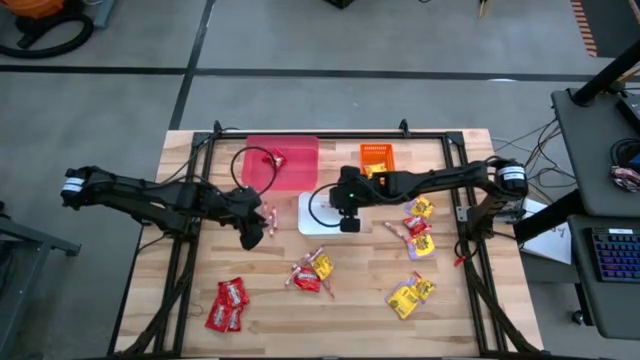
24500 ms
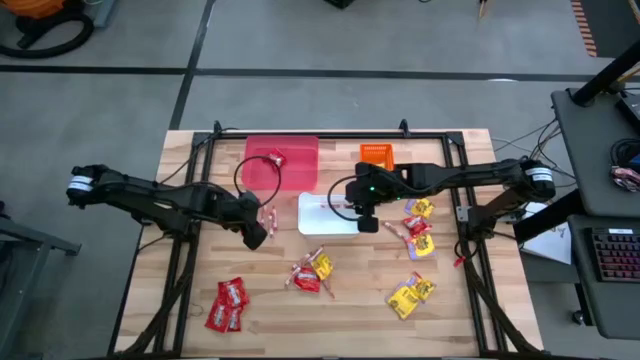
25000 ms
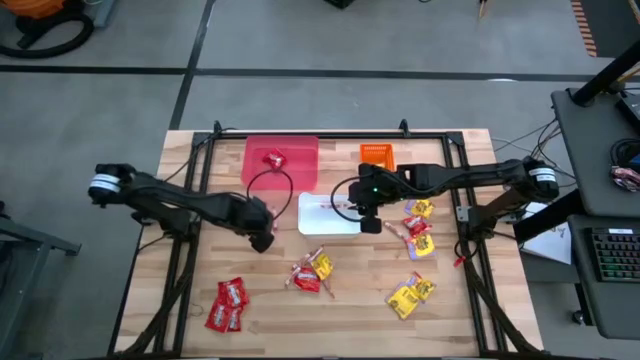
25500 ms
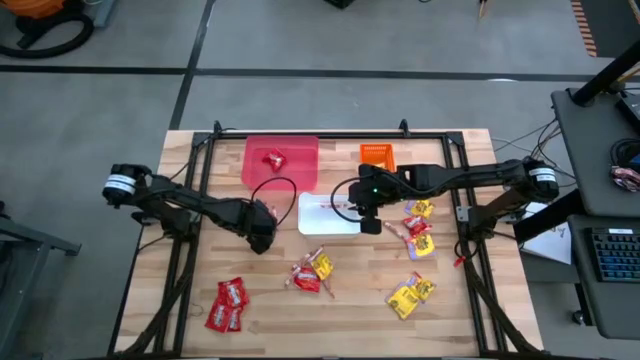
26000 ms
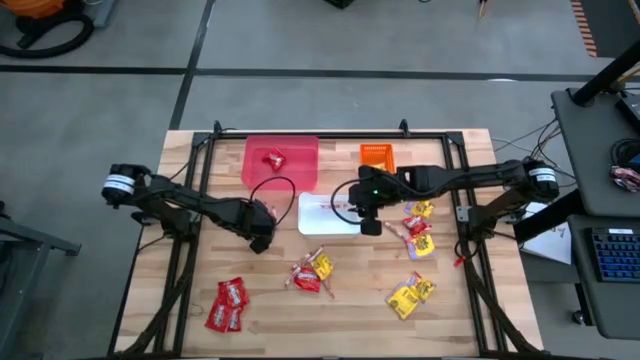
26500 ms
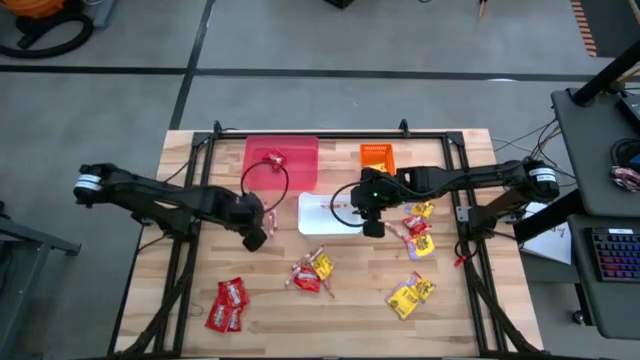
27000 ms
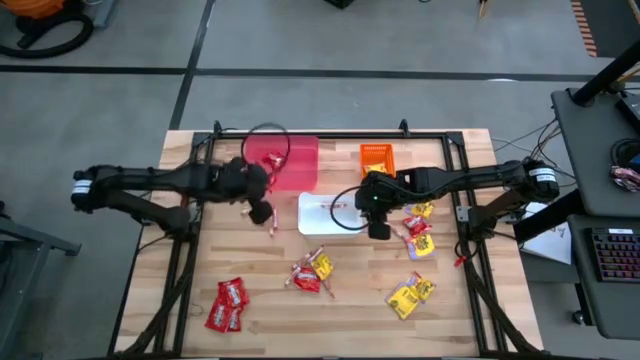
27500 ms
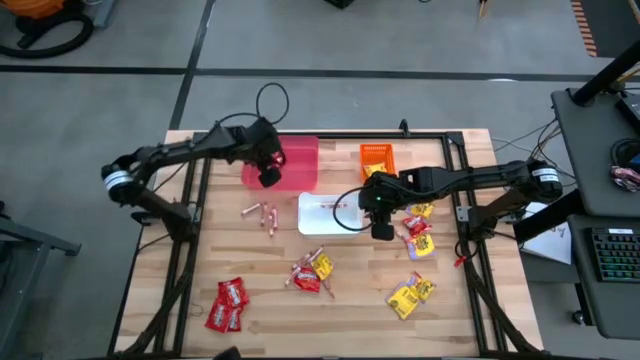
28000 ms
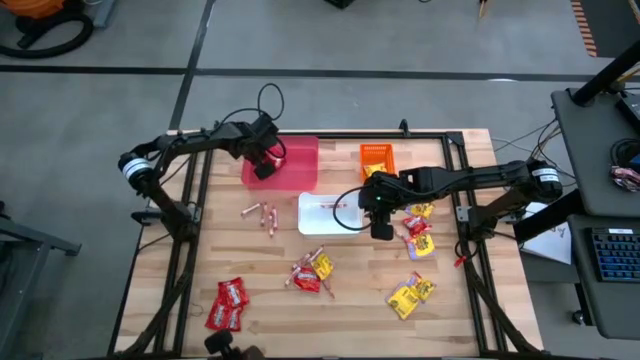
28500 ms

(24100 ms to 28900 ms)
Task: Sort candy
Put the red chocolate into the red bin

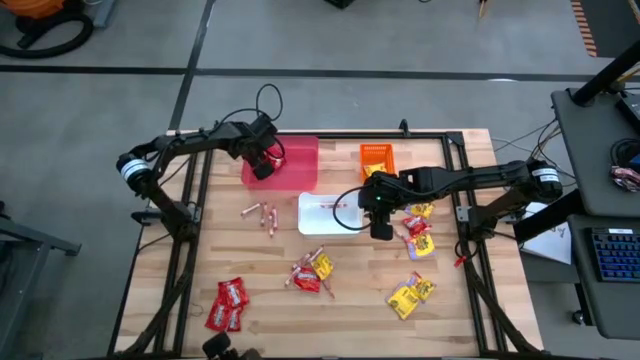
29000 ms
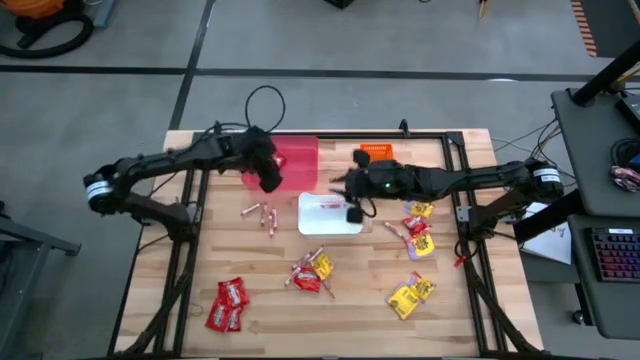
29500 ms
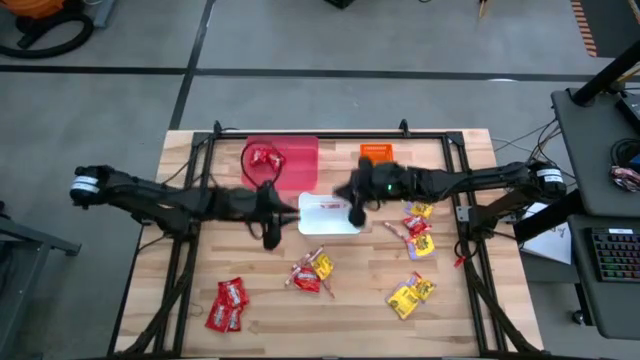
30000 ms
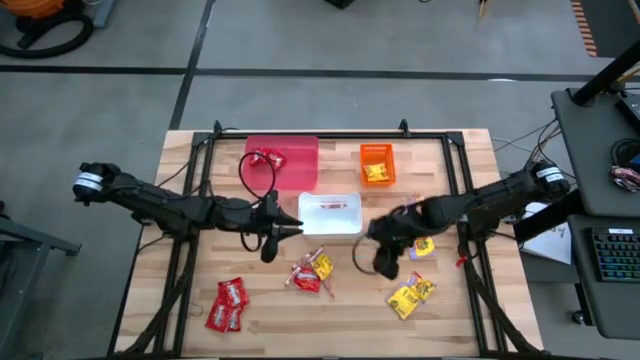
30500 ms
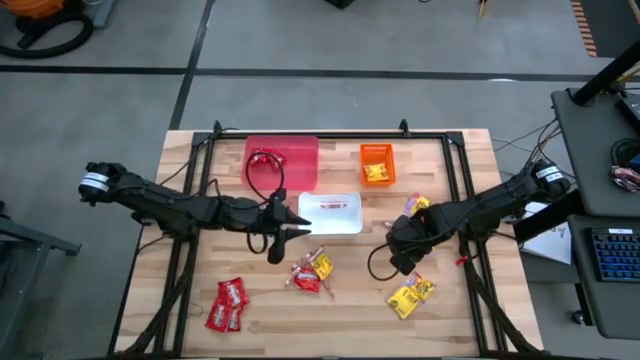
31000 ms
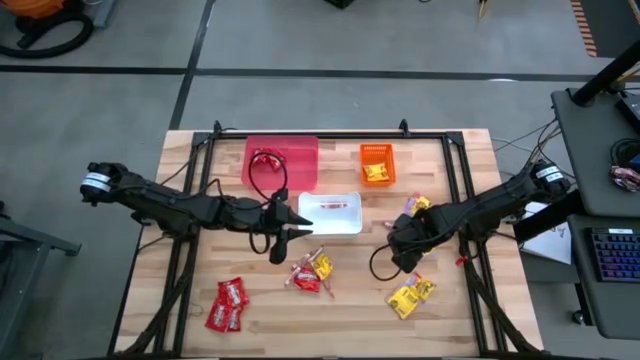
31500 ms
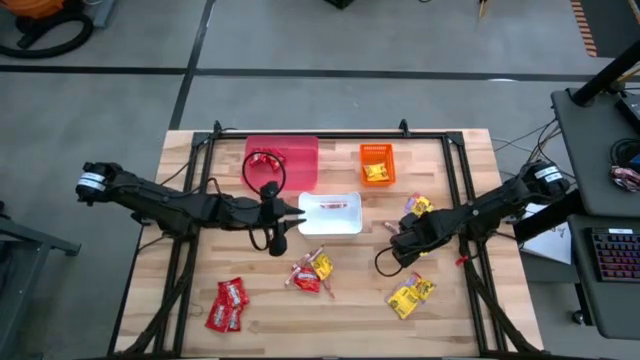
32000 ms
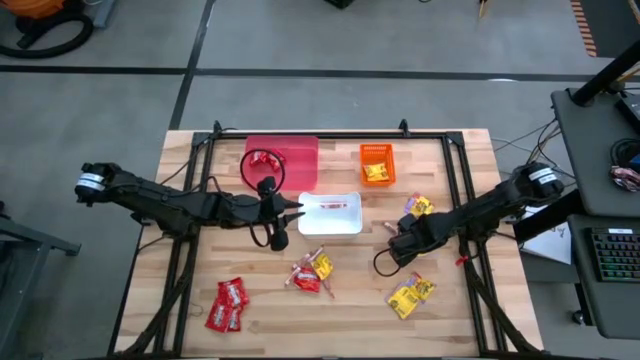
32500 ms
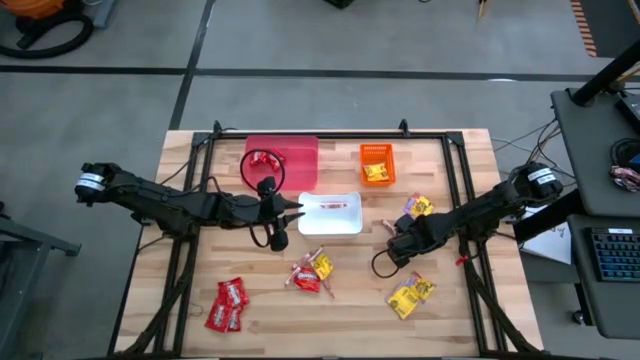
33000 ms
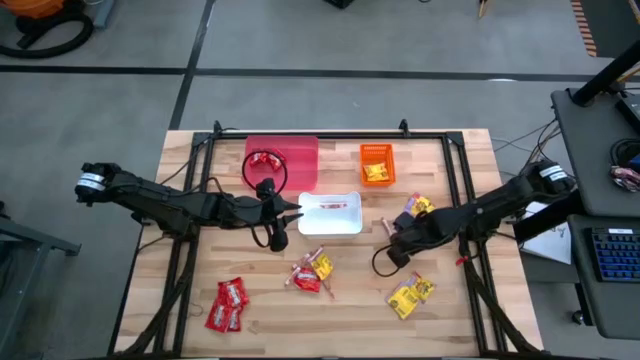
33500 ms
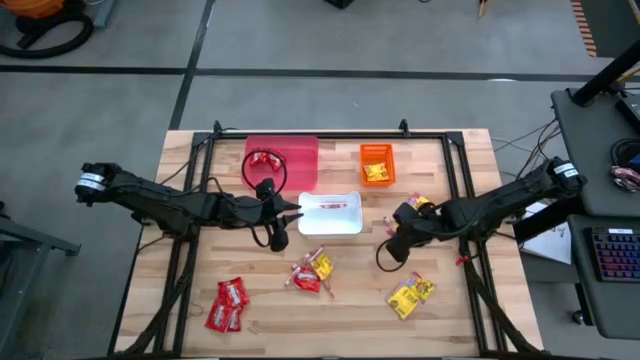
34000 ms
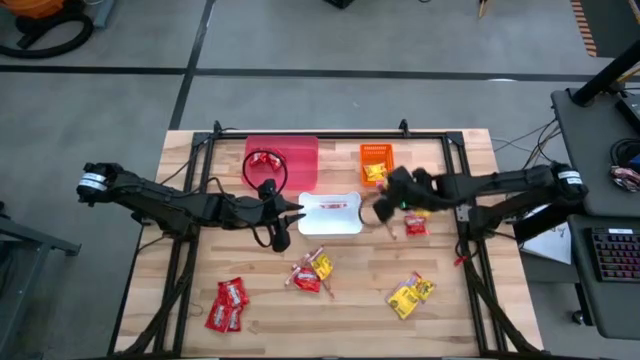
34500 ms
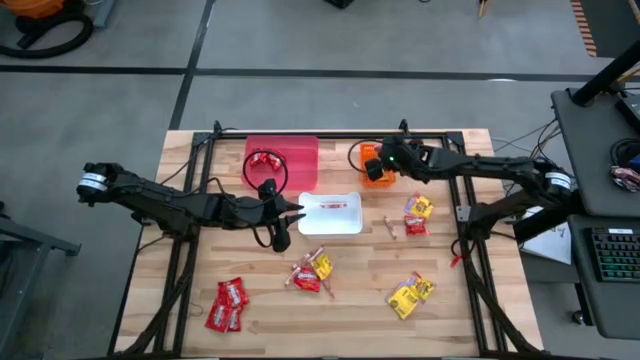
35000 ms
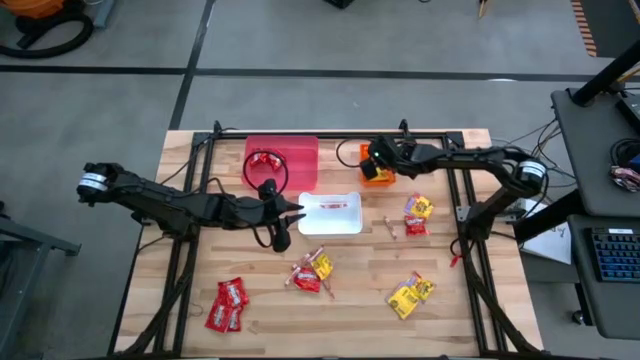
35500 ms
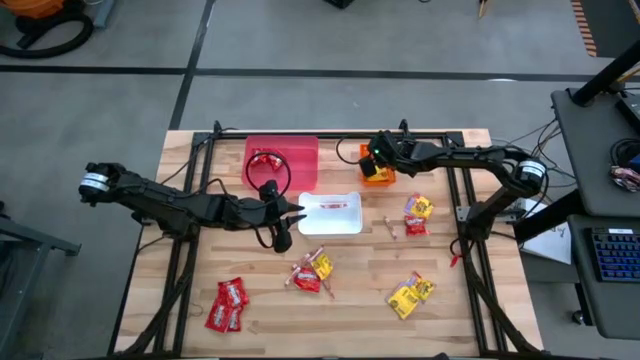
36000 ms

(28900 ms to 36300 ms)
Put the yellow candy into the orange bin

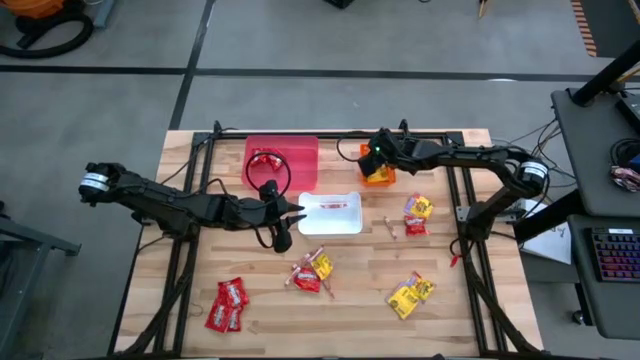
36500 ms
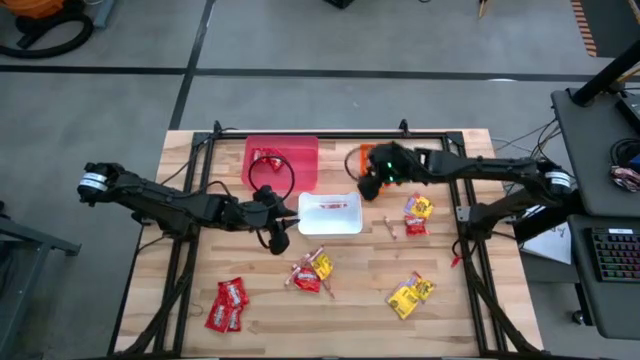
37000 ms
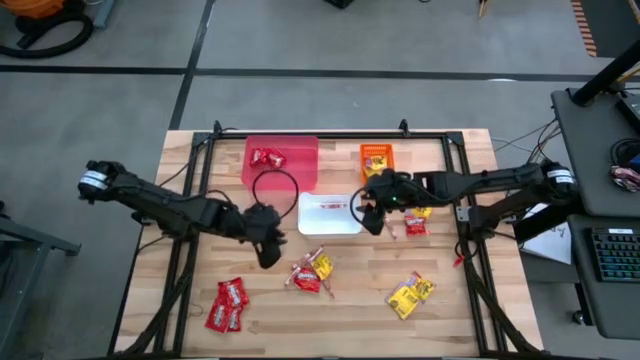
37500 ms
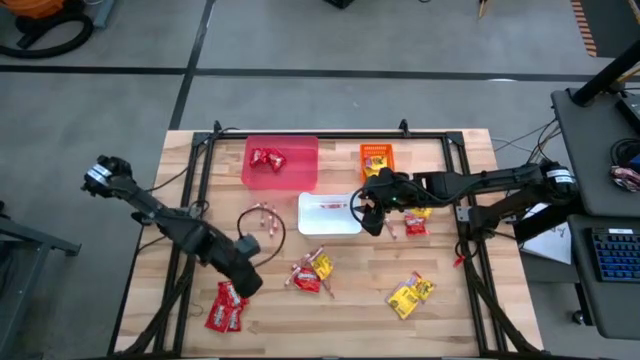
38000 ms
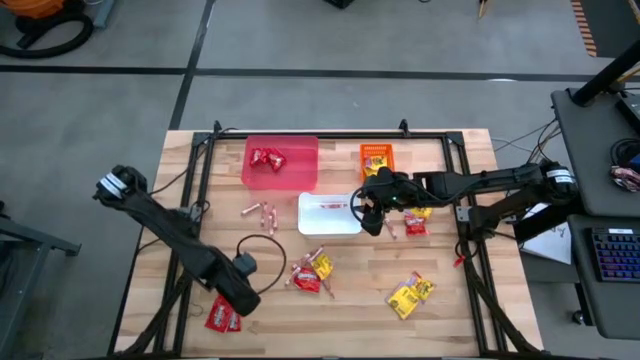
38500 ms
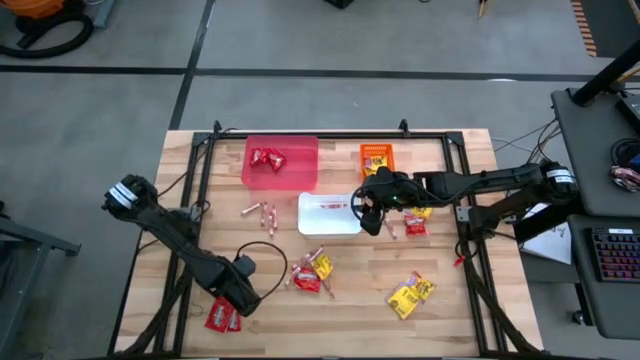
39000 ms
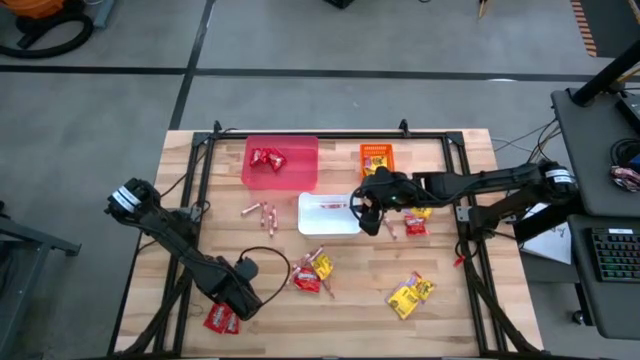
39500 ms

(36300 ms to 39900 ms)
Put the red chocolate into the red bin

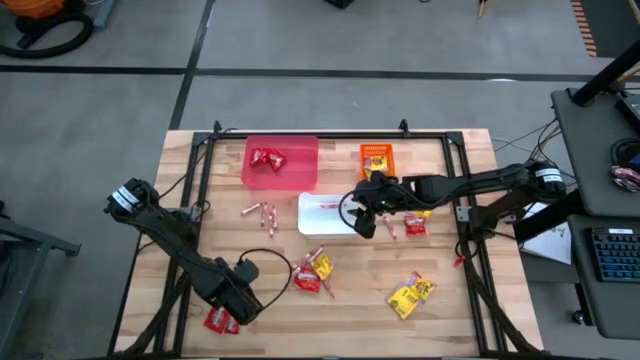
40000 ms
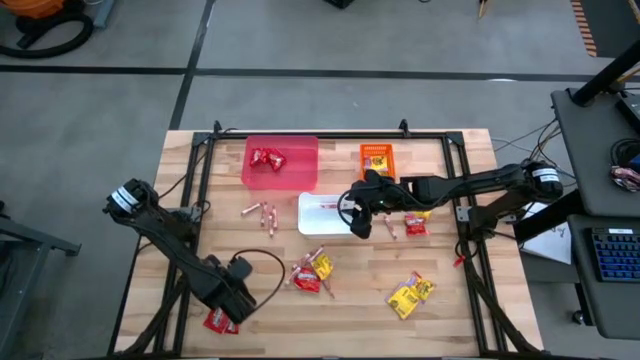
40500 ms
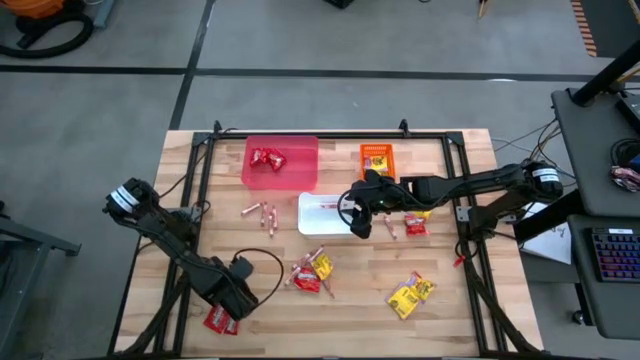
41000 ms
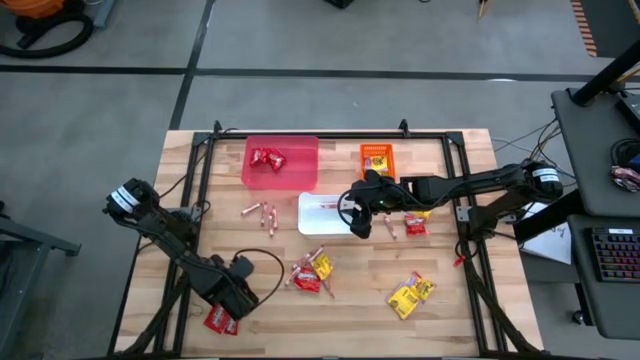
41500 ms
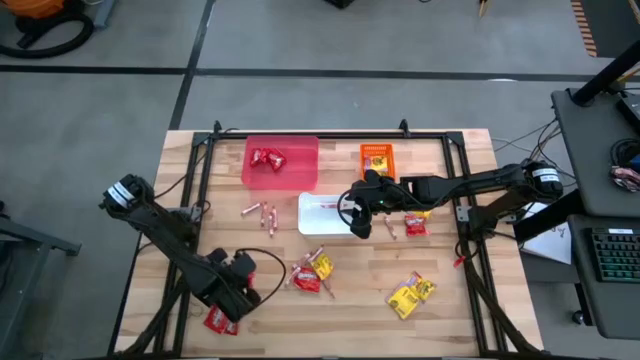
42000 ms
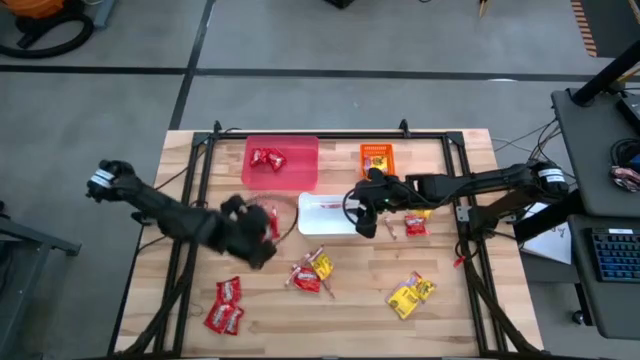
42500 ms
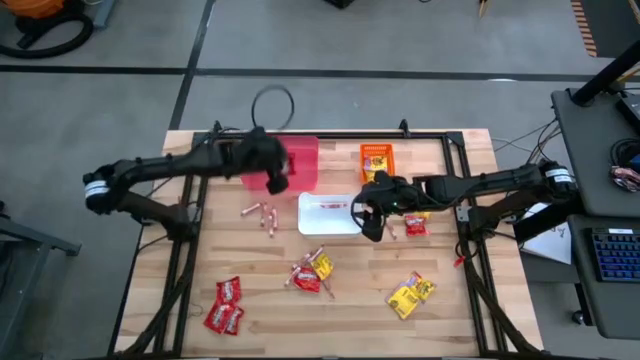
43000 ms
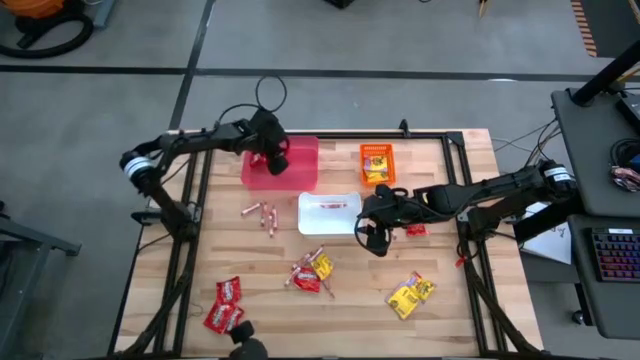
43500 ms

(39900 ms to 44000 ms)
Put the red chocolate into the red bin
